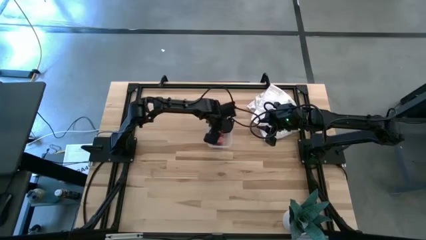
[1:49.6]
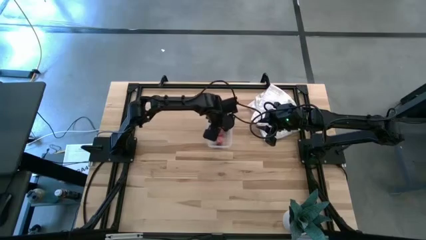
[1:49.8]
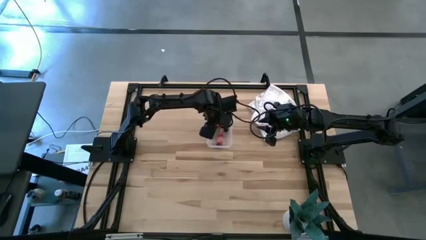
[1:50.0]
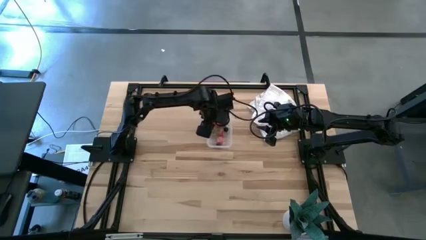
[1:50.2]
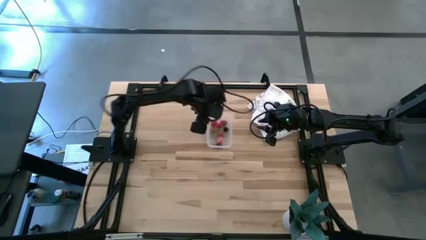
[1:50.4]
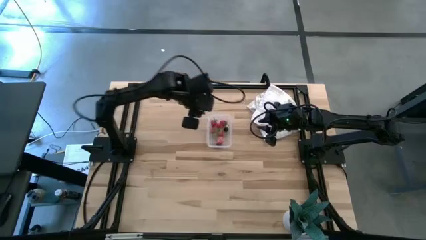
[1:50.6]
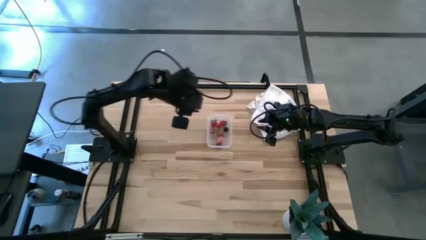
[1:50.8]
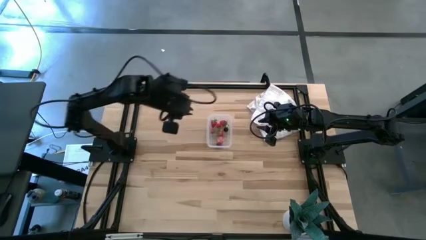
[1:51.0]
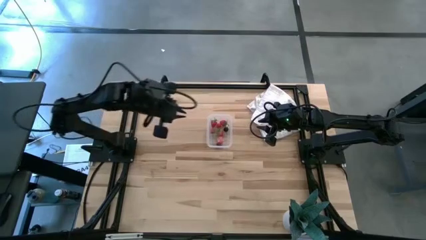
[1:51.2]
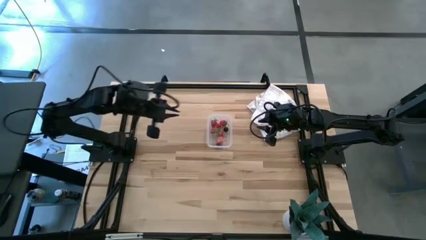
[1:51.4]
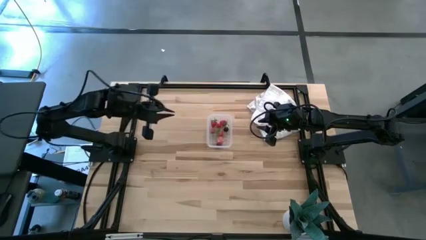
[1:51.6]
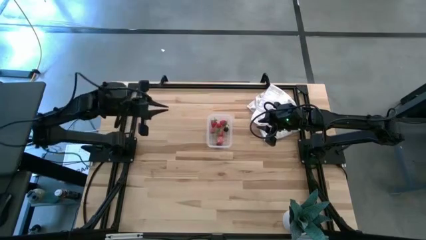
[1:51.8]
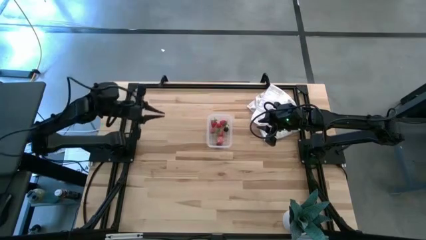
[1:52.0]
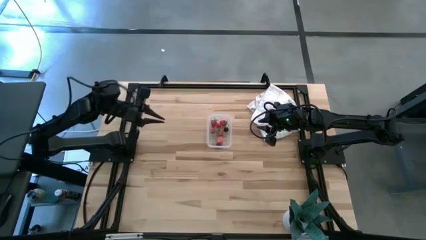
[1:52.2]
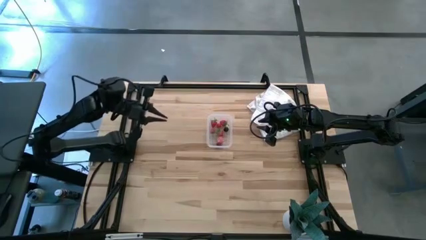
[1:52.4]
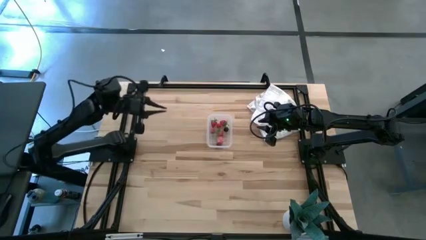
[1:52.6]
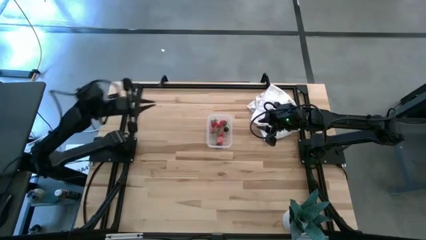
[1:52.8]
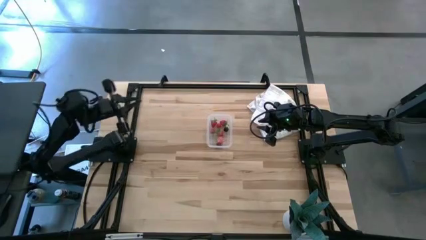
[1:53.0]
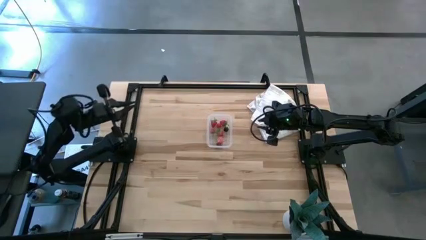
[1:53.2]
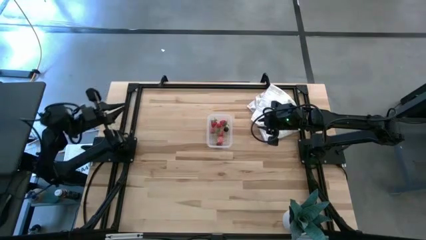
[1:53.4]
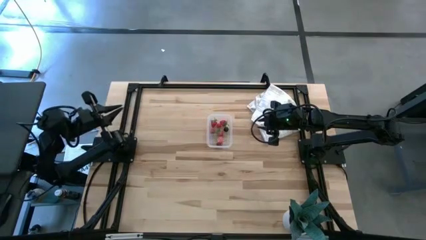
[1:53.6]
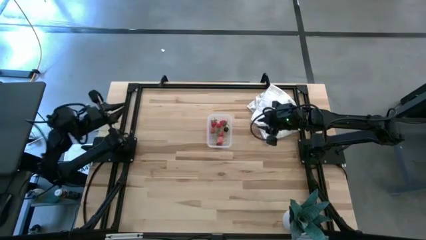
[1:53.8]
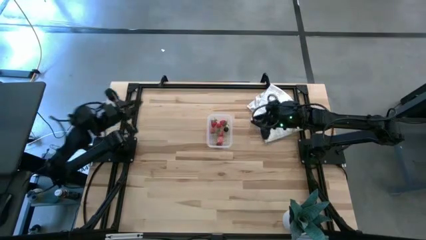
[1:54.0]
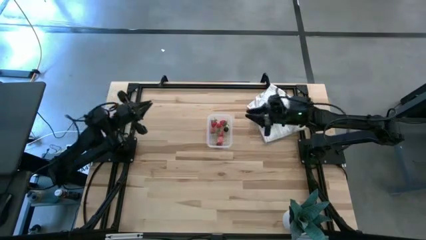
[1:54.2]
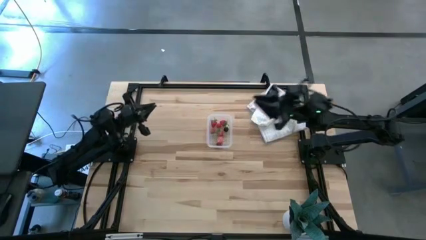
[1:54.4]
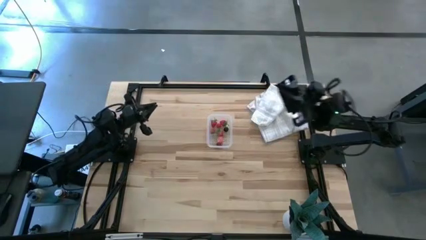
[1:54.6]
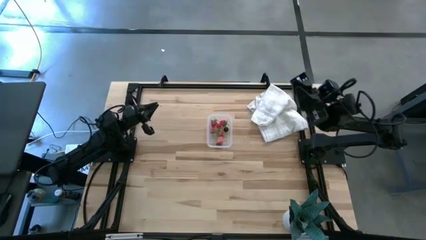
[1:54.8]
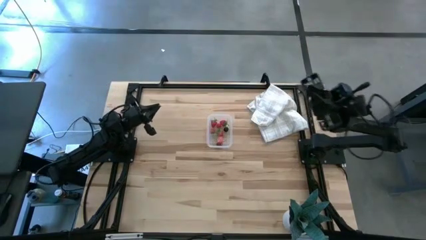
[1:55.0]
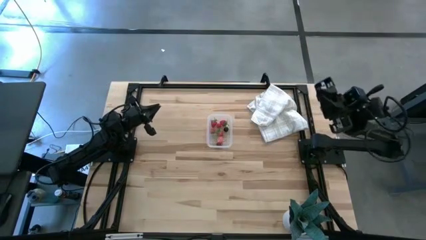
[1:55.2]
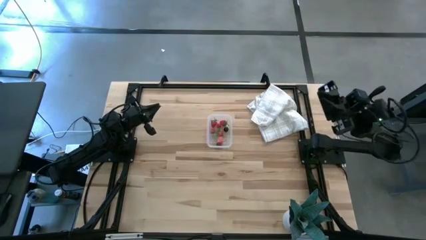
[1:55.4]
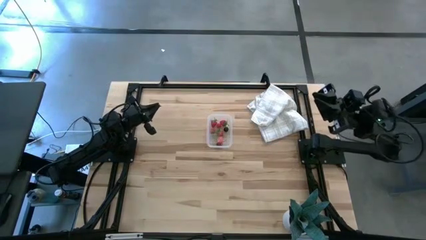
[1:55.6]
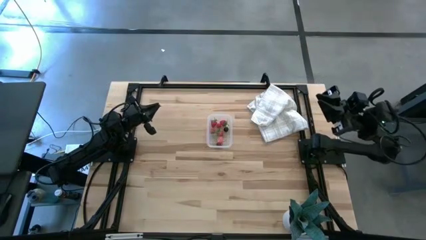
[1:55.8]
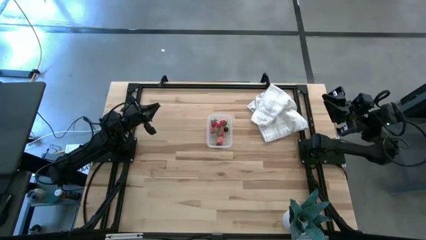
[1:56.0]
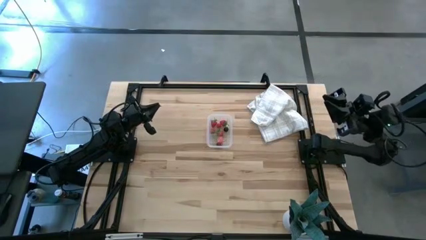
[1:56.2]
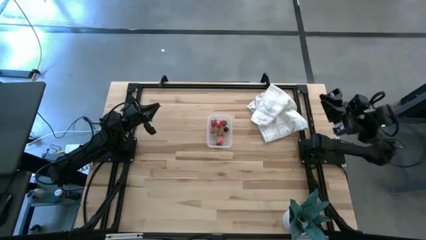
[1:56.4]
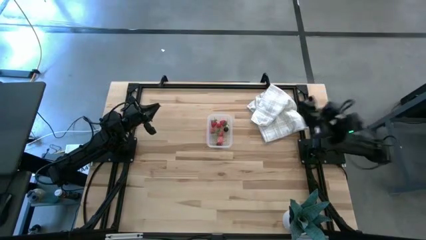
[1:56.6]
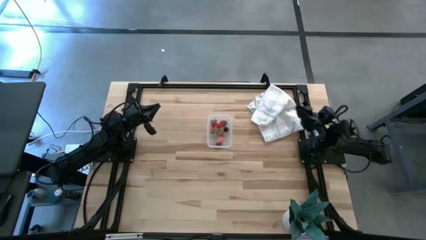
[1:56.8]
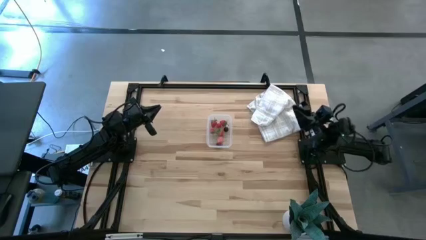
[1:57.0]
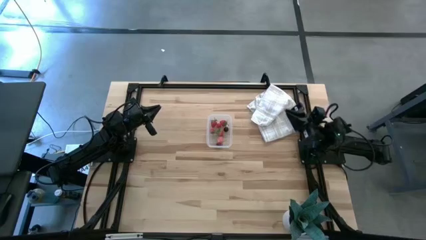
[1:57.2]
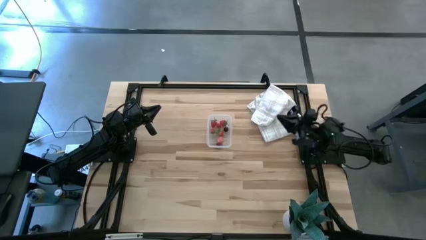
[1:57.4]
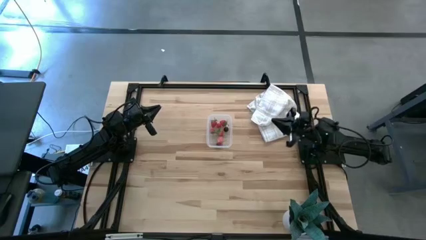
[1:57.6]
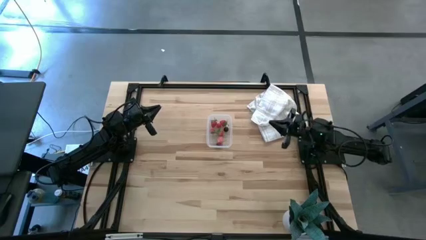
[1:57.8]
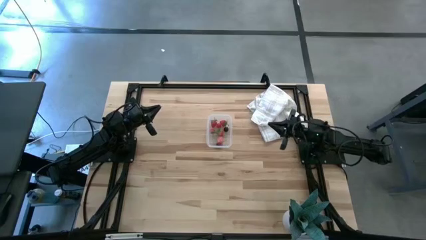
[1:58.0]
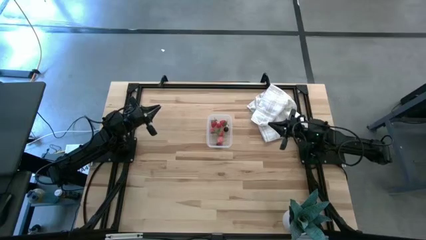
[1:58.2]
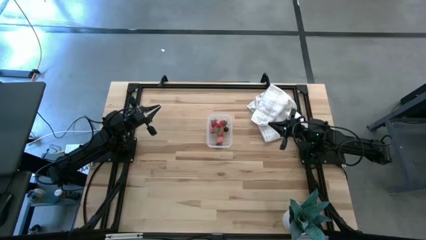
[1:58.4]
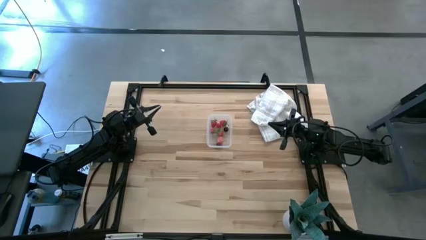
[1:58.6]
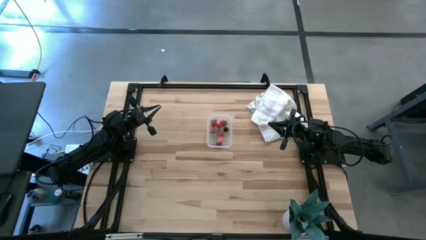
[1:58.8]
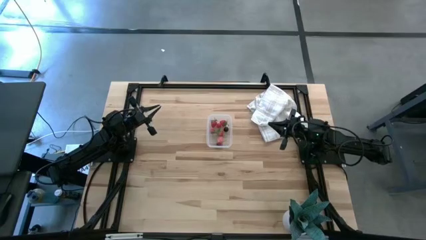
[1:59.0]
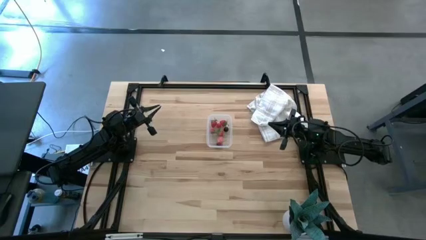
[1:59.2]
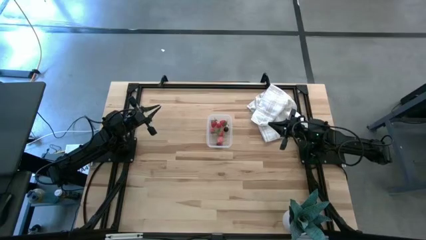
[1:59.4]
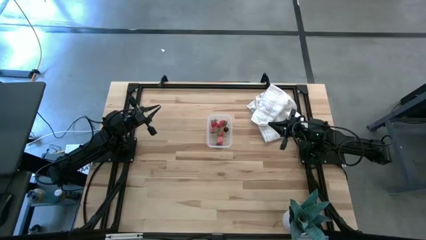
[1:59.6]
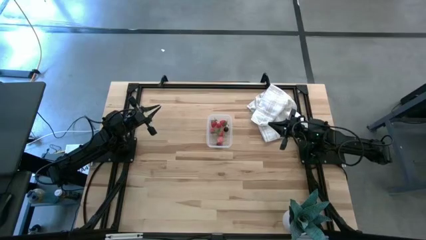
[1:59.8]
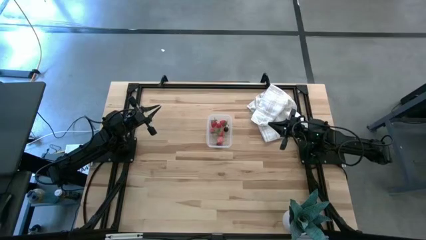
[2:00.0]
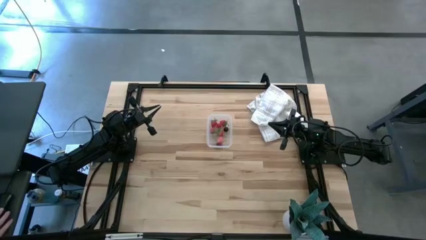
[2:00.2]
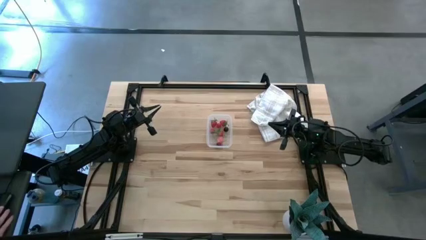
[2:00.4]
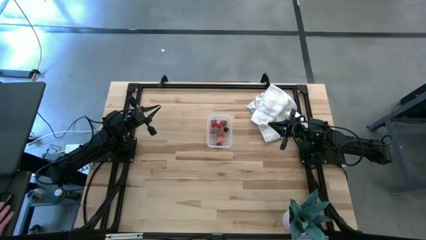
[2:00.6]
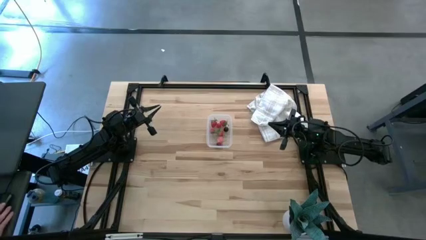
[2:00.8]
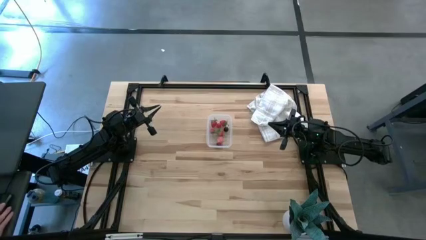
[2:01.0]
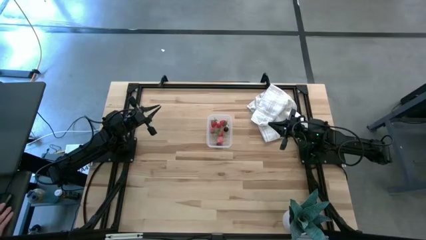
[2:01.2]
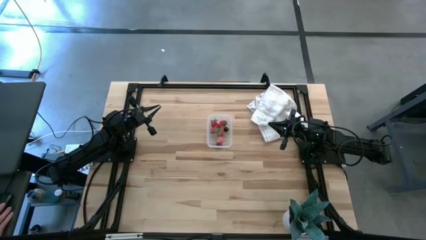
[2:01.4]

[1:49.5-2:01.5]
Task: Pick and placing Produce into tupperware
Return to Home Position
